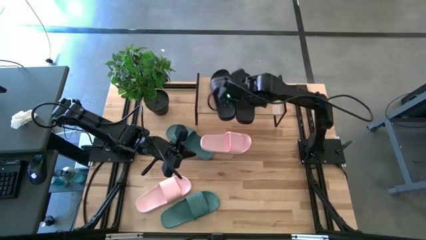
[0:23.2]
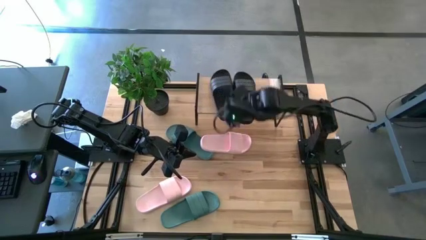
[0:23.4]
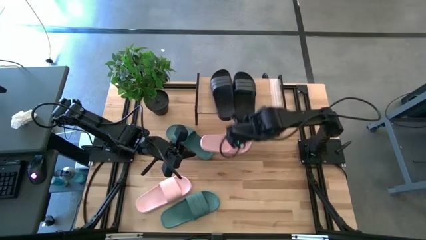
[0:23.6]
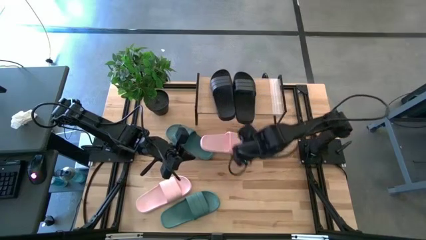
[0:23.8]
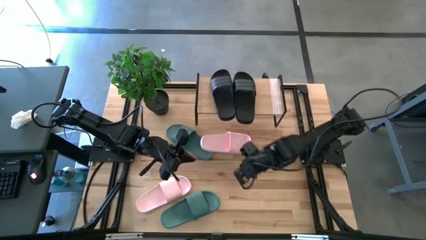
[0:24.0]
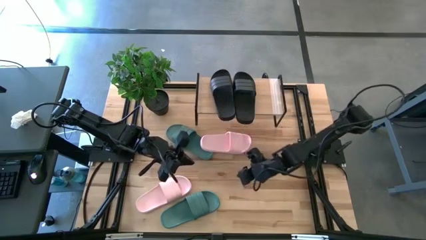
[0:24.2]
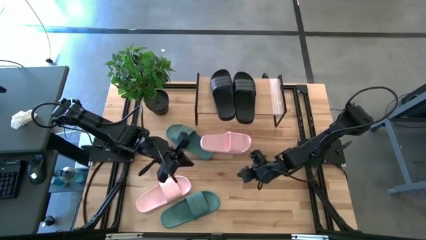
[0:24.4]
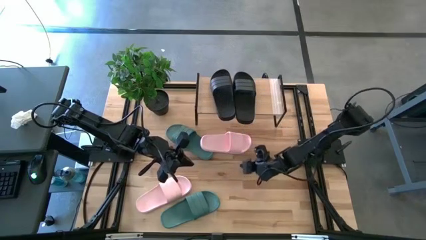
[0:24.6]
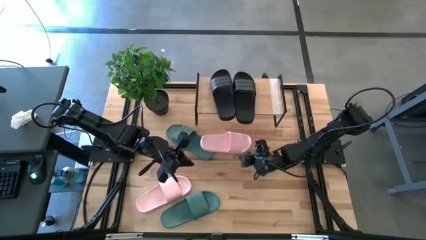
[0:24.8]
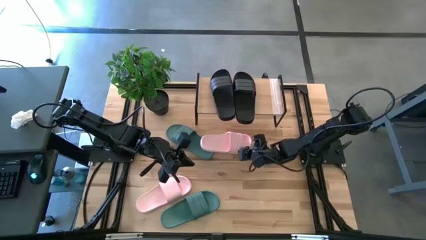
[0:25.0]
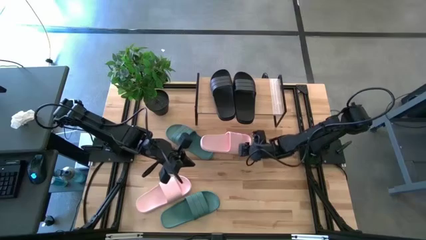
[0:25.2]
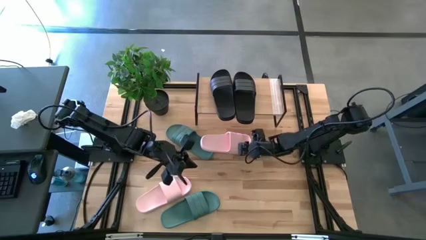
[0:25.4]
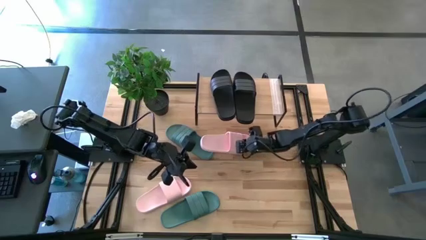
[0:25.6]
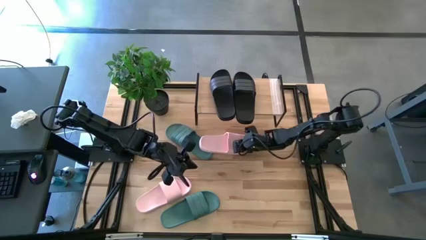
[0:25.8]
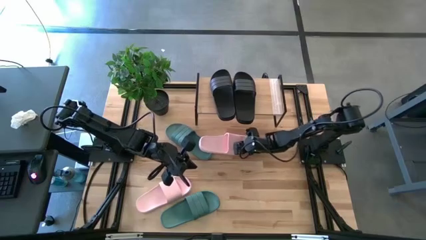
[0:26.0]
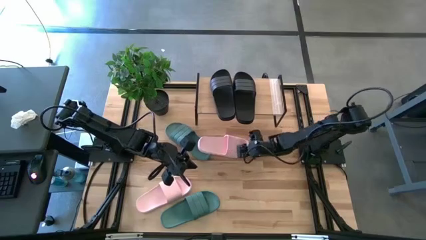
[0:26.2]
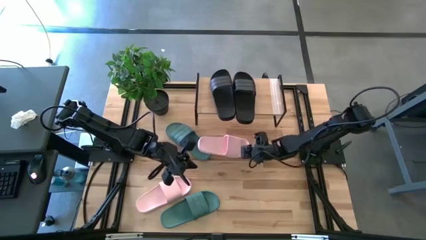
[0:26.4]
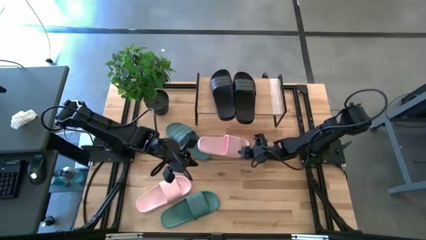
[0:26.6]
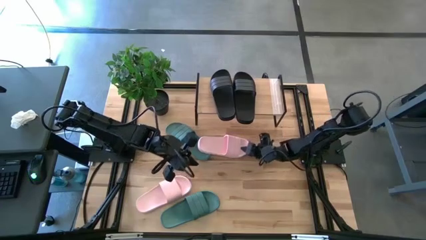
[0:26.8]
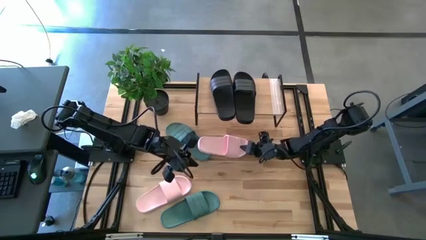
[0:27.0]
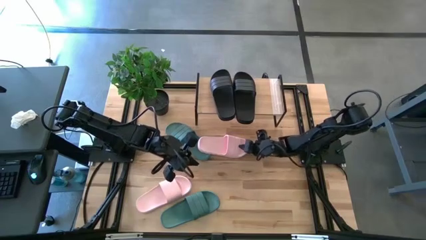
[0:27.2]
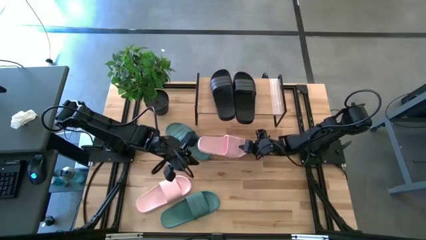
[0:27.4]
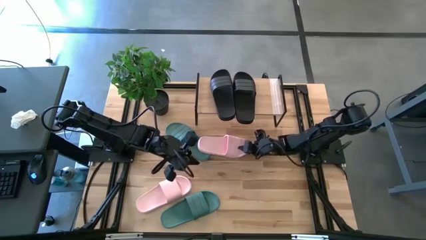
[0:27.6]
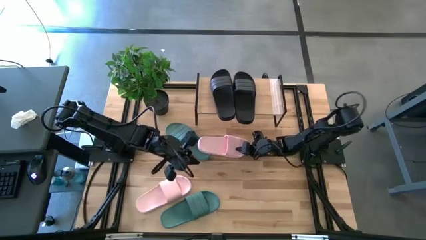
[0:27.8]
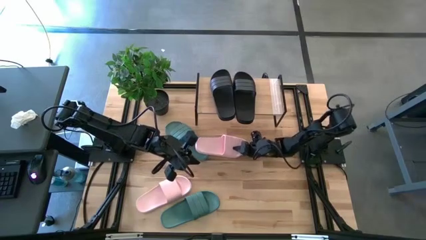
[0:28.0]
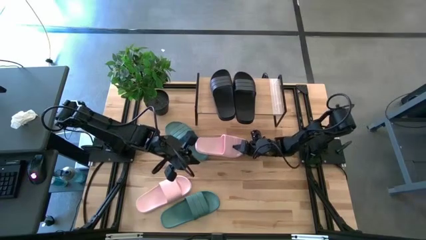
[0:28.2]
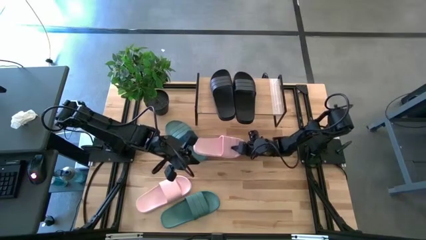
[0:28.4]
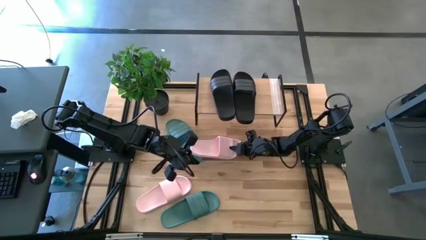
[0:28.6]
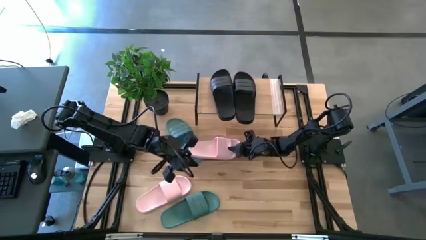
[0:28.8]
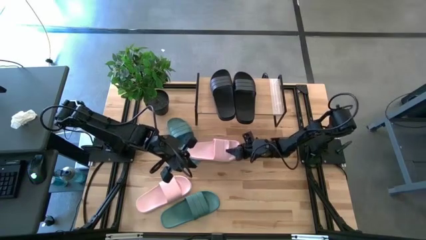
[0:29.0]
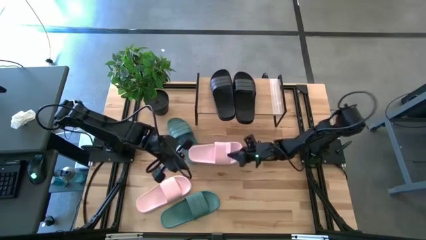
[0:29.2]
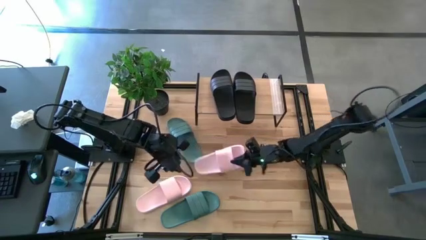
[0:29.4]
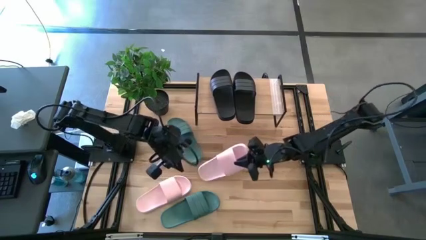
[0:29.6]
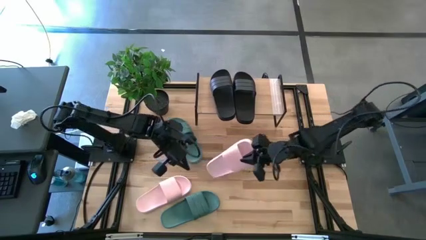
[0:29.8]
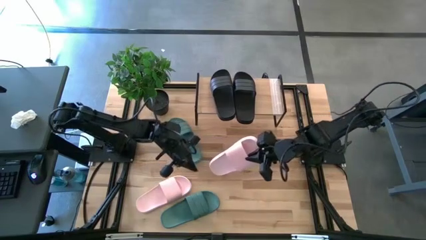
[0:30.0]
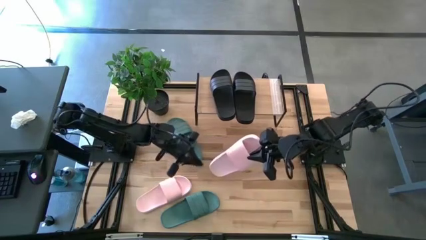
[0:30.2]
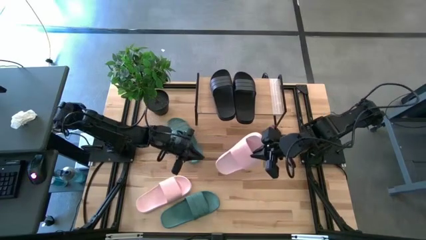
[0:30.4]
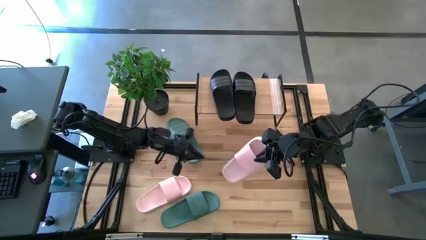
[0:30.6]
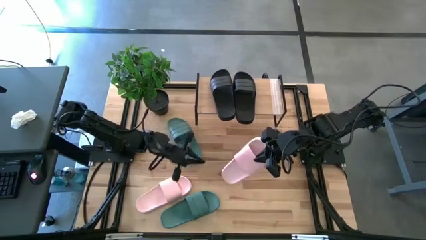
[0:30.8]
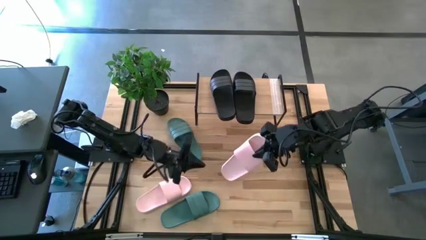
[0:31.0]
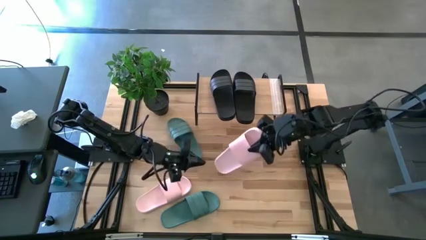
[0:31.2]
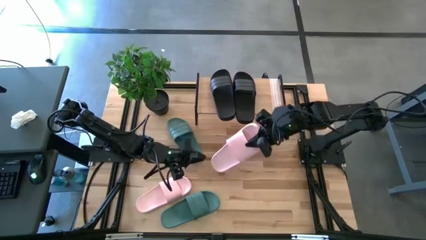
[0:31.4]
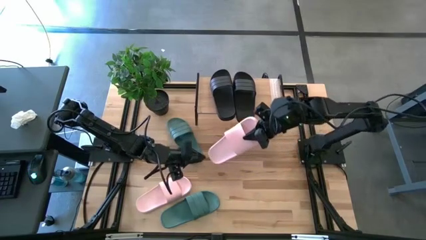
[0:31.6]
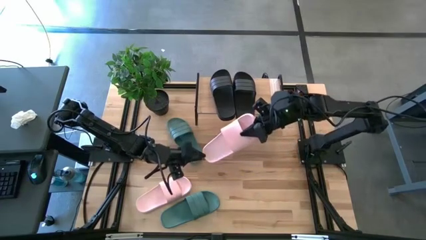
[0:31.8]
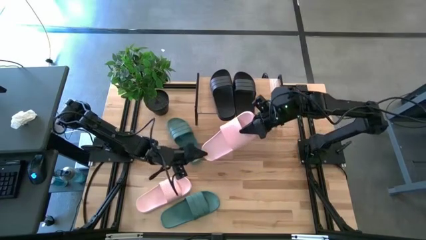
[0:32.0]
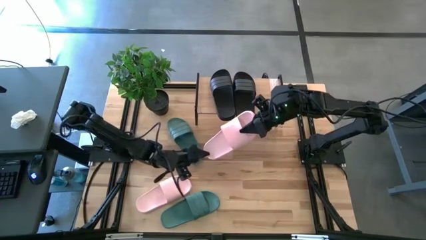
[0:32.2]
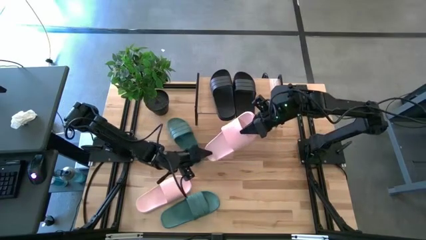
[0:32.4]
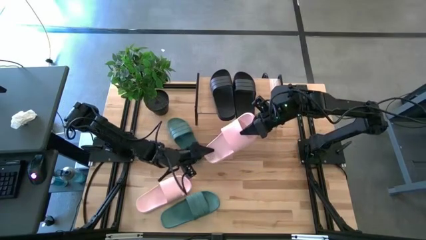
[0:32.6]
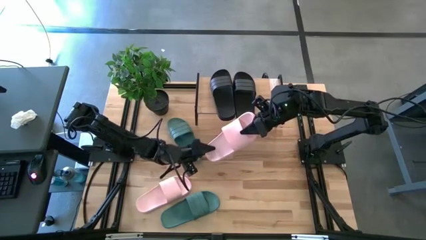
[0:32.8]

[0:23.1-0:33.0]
Task: Pick and place slides into the shelf
Put the top pink slipper under the shelf

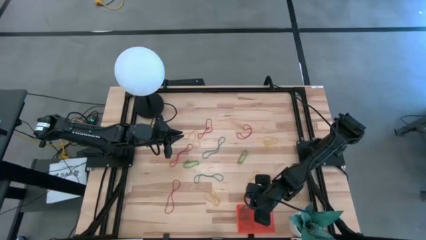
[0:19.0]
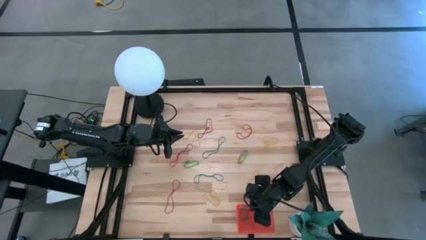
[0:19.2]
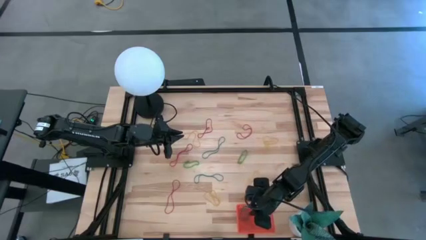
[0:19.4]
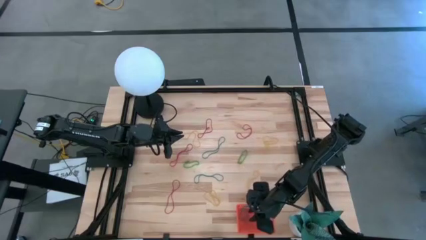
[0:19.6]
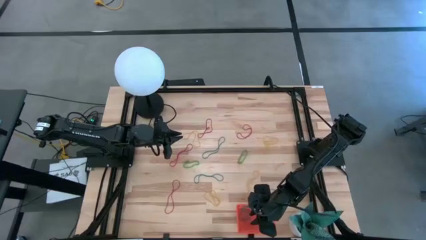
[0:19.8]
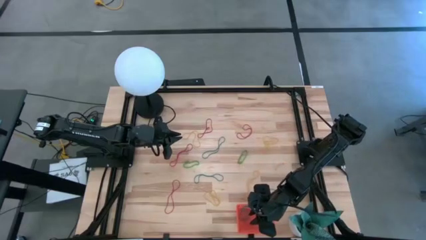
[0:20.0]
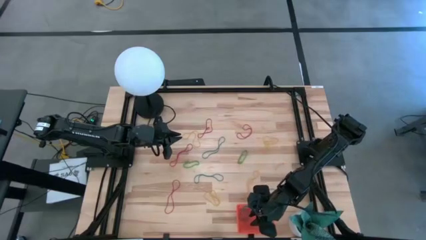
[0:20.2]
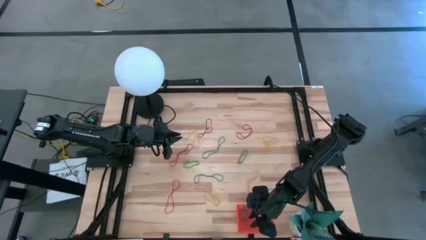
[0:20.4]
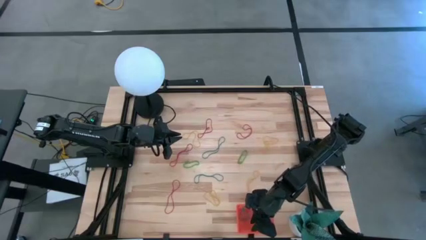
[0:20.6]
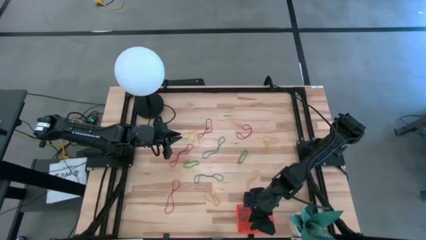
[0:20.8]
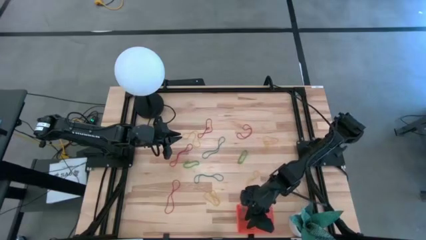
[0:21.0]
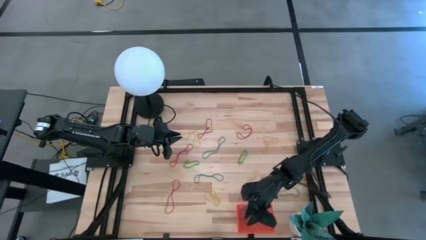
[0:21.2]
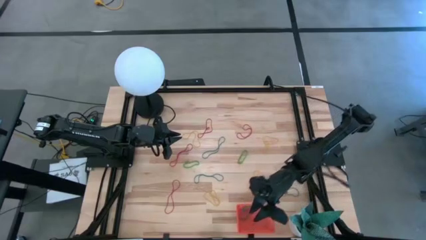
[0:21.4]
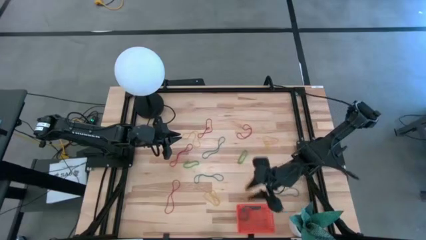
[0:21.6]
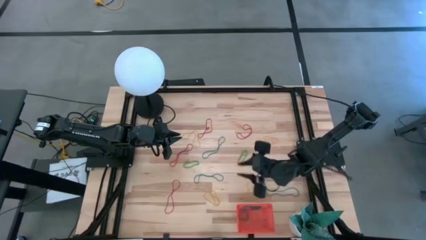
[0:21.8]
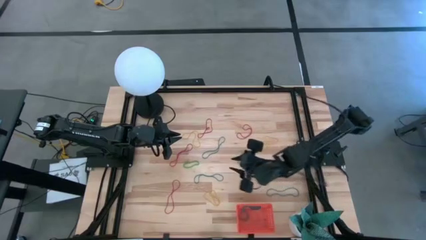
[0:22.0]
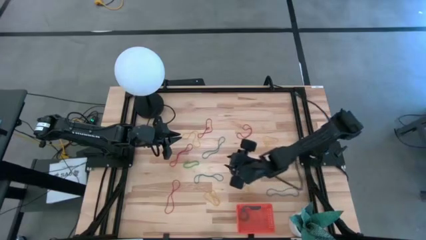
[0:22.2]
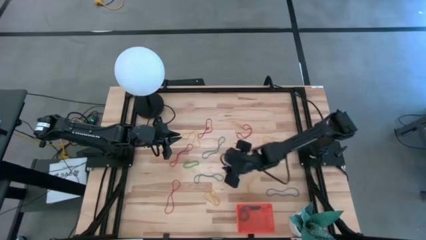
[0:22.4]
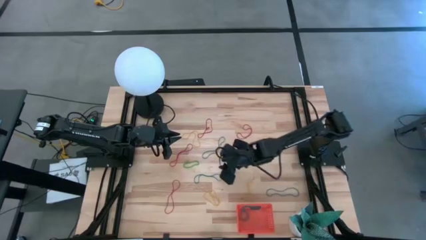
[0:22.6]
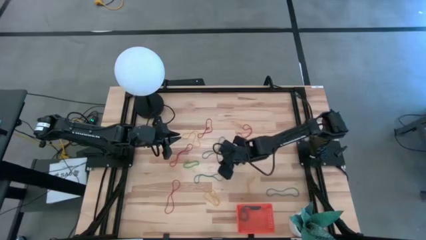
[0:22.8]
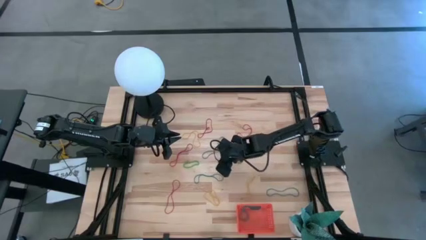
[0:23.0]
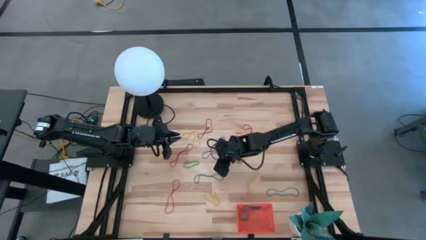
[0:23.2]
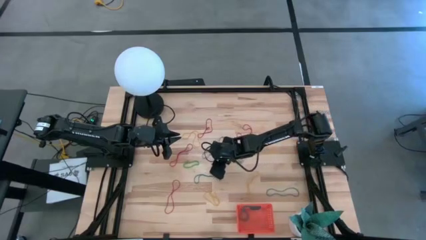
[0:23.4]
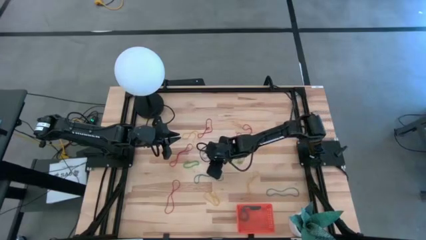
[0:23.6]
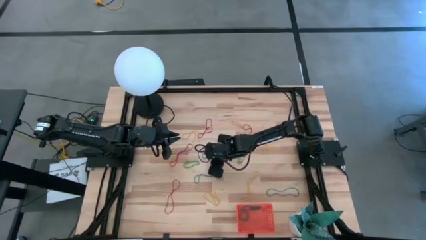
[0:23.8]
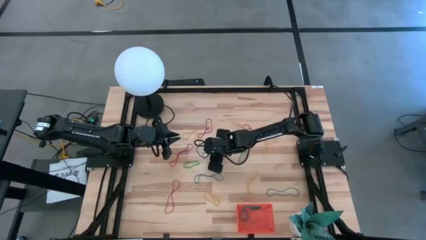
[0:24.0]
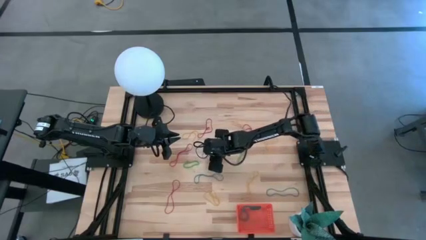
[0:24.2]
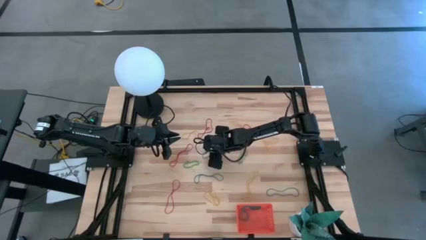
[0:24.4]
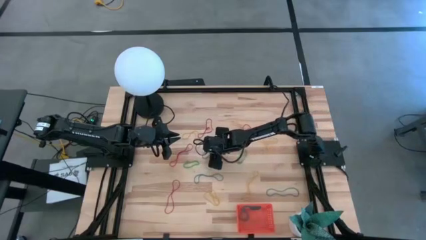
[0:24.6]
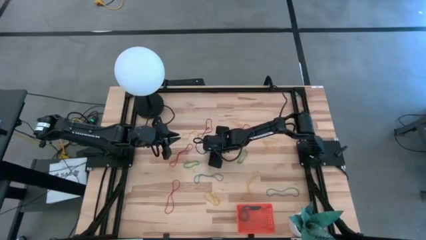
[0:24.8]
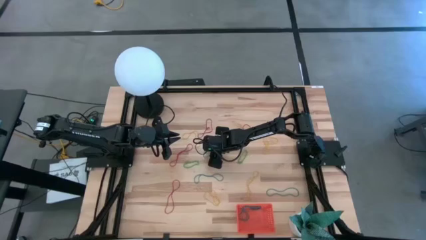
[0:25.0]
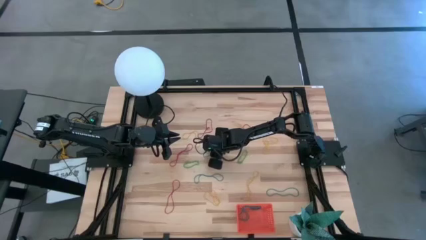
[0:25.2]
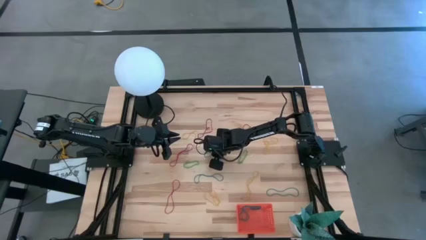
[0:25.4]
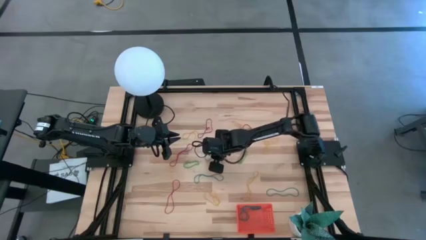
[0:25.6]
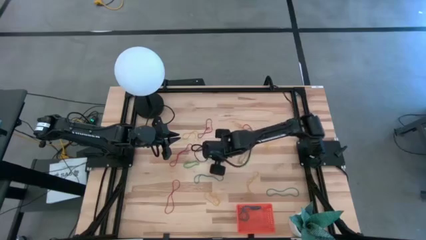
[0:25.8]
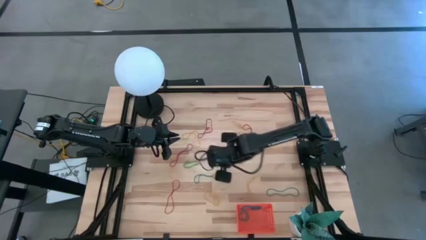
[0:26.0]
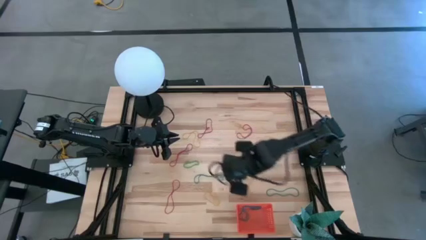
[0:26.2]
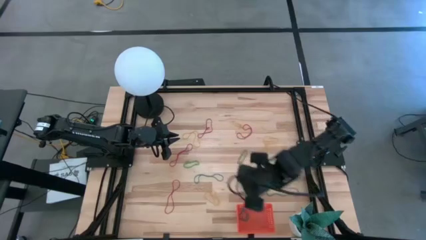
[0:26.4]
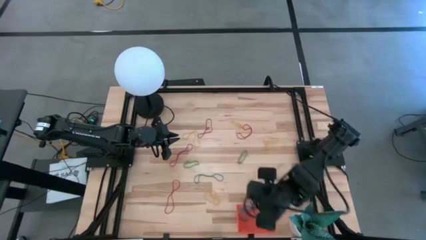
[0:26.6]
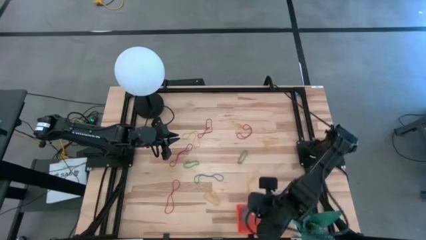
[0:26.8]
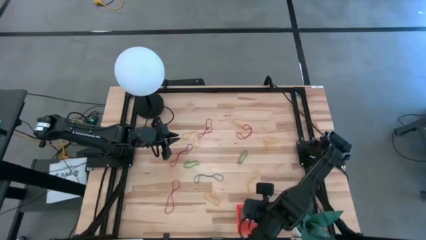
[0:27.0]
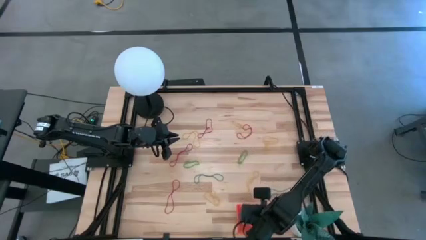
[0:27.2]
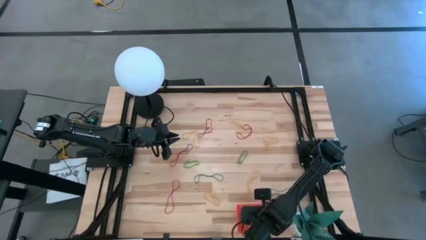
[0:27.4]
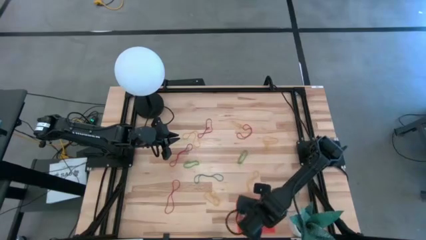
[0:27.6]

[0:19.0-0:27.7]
Task: Pick and place items into bin
Put the blue rubber band into the orange bin
